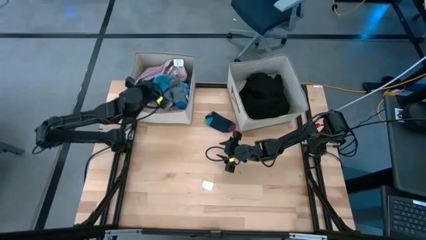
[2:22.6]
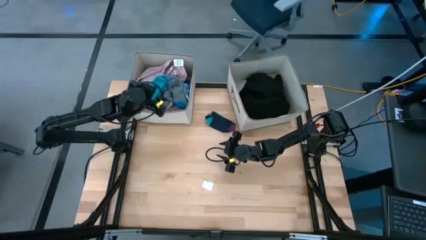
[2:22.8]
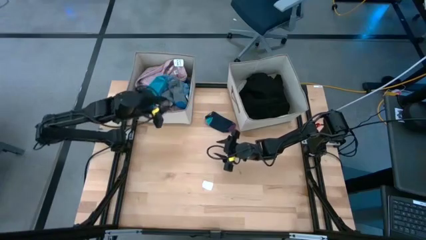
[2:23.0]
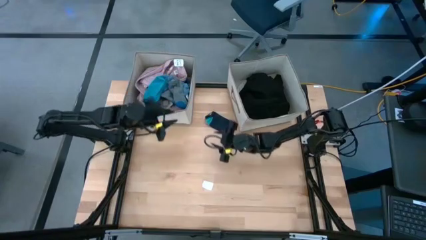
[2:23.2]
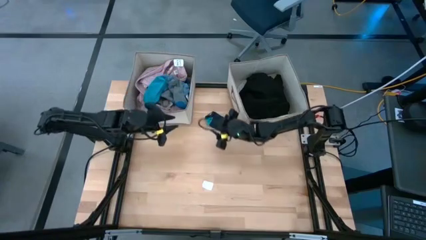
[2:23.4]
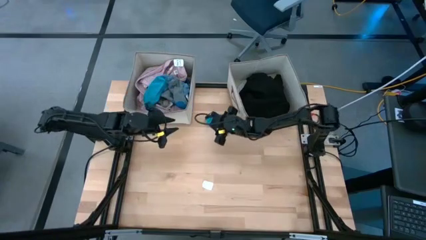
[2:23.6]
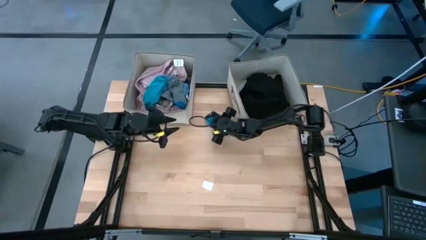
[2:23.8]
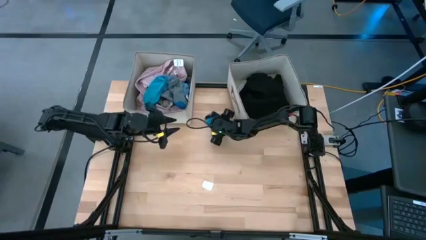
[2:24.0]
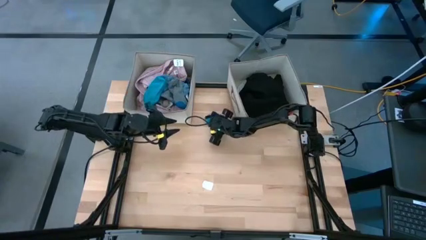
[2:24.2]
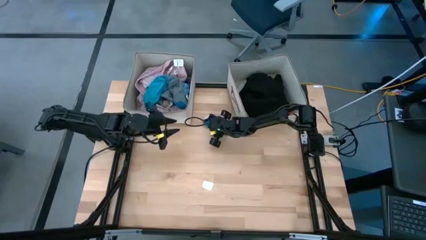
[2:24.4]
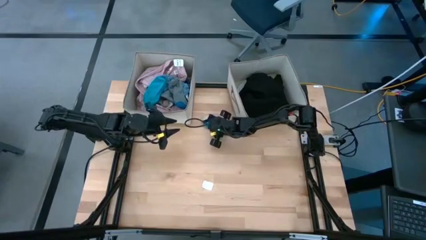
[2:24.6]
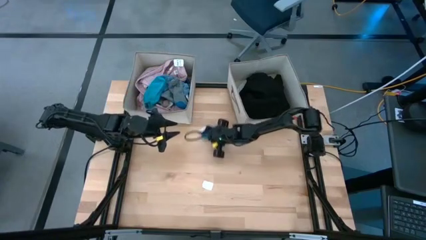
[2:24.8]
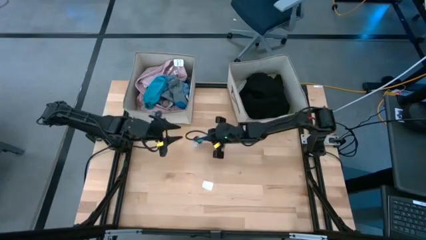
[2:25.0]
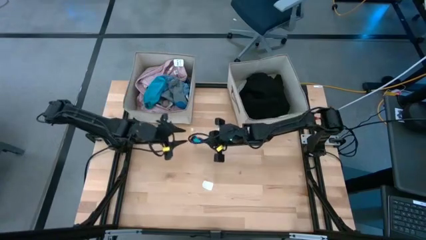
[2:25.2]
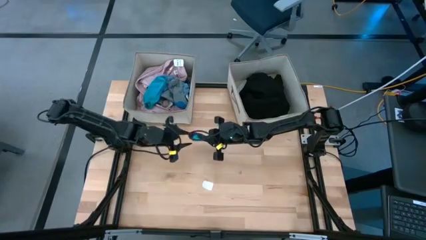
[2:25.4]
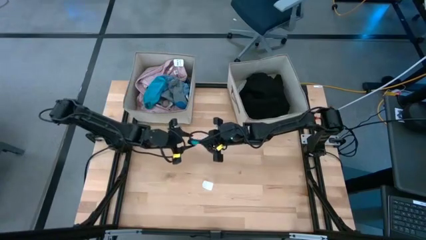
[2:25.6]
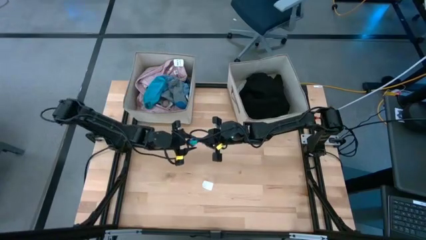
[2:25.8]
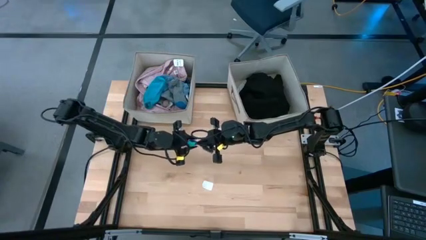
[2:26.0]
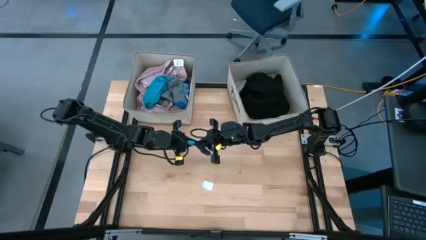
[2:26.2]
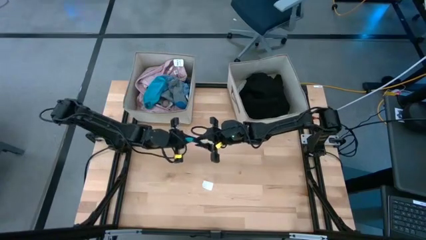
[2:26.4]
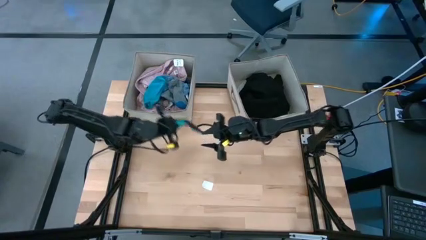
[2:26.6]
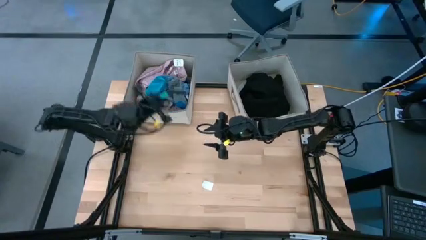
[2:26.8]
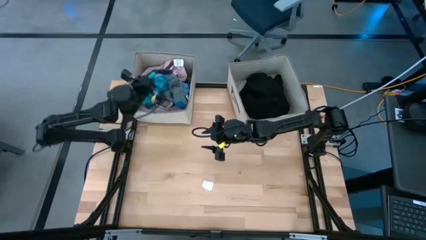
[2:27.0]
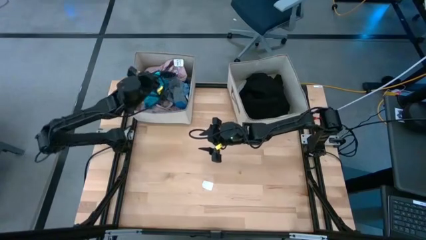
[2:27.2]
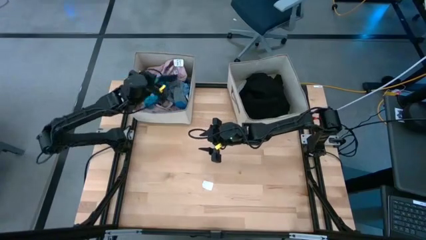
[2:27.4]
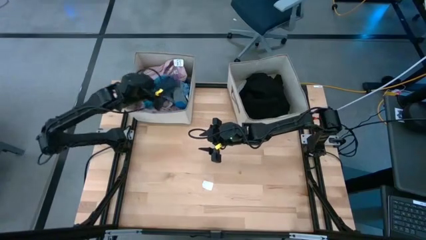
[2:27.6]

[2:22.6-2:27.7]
Task: Sort clothes
Put the dark blue sock into the left brown laundry organizer

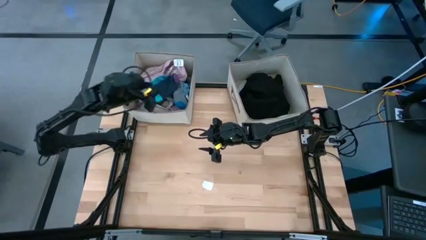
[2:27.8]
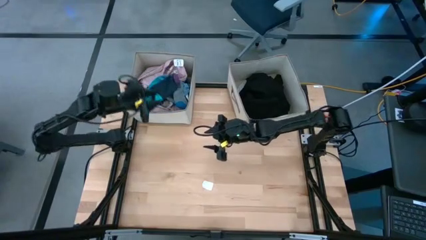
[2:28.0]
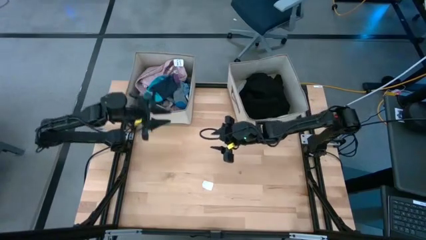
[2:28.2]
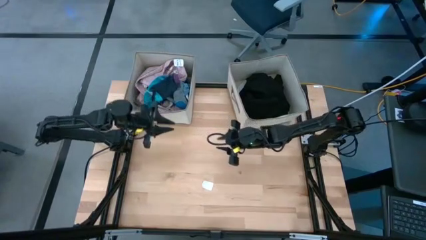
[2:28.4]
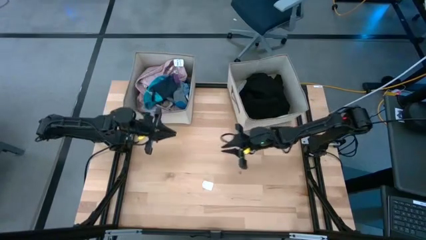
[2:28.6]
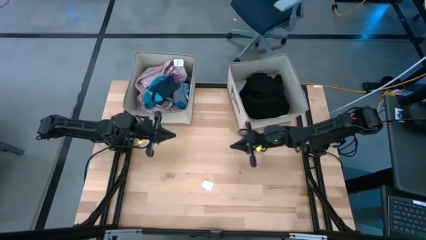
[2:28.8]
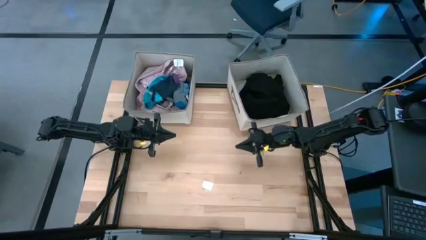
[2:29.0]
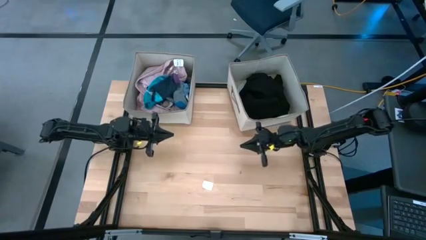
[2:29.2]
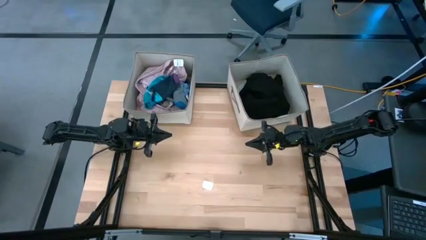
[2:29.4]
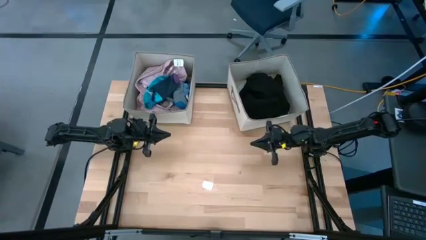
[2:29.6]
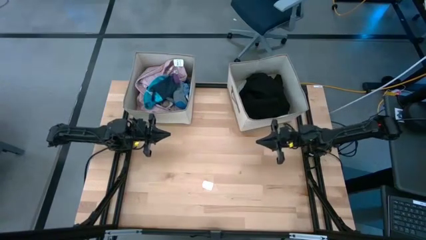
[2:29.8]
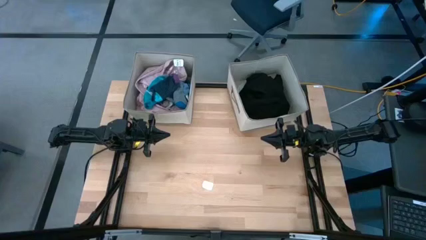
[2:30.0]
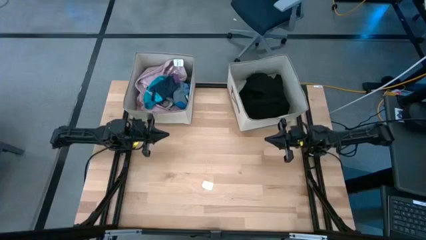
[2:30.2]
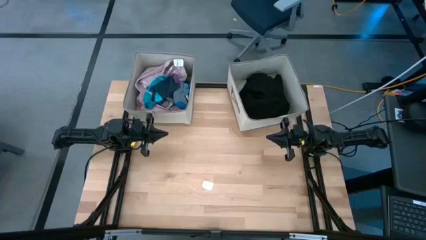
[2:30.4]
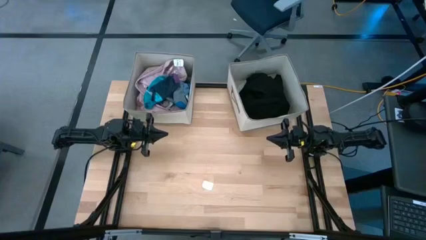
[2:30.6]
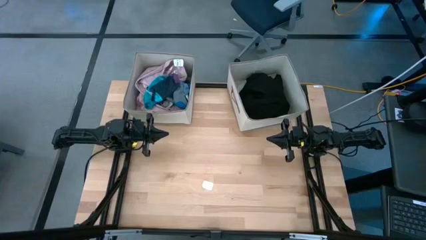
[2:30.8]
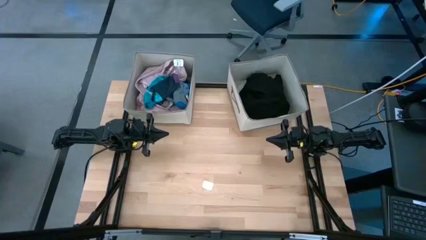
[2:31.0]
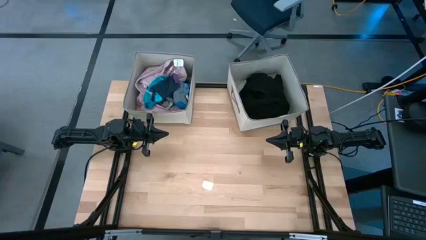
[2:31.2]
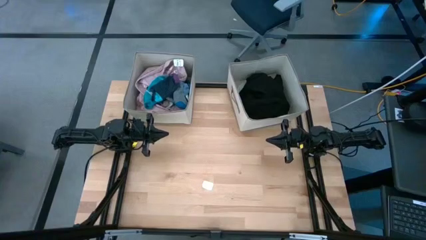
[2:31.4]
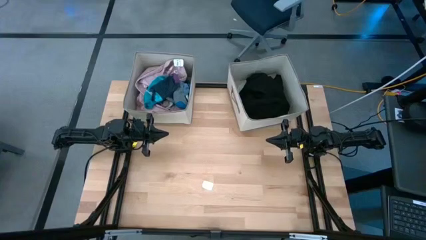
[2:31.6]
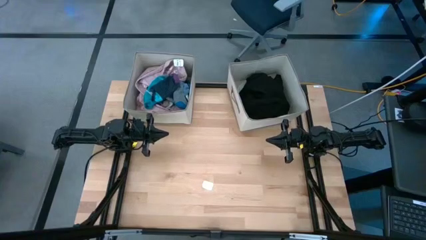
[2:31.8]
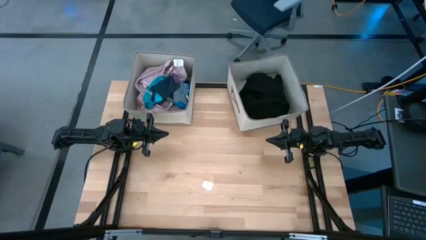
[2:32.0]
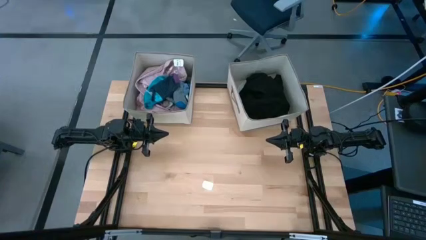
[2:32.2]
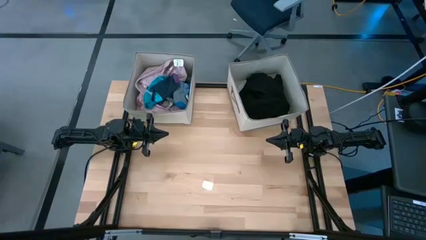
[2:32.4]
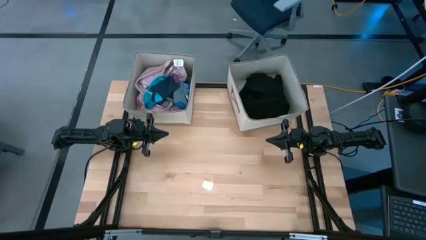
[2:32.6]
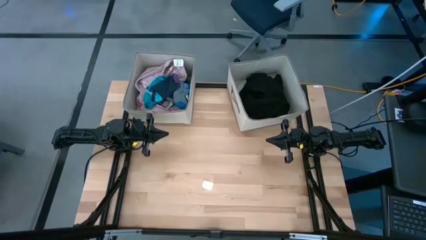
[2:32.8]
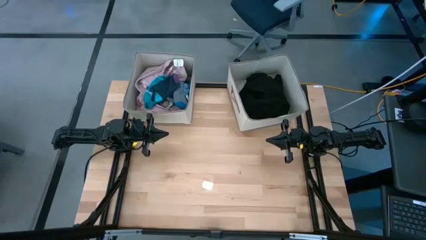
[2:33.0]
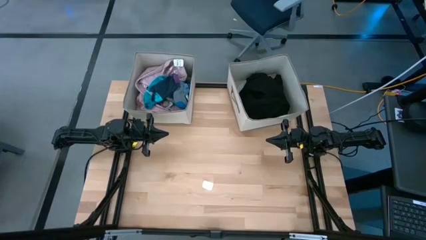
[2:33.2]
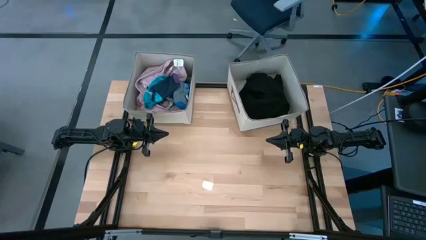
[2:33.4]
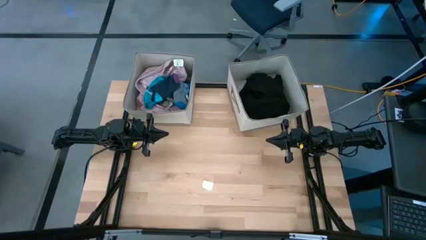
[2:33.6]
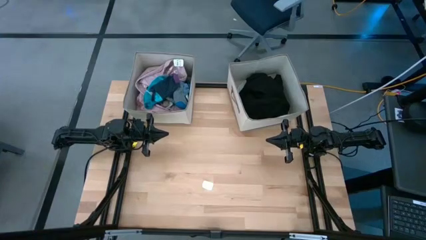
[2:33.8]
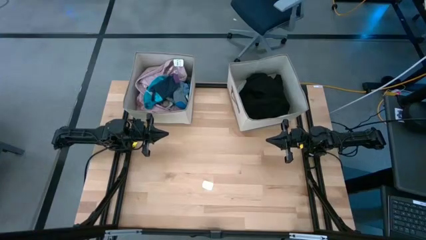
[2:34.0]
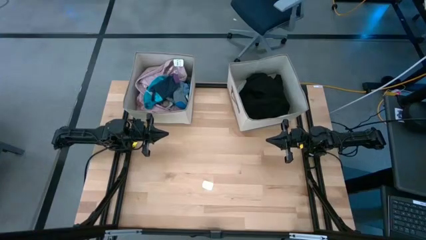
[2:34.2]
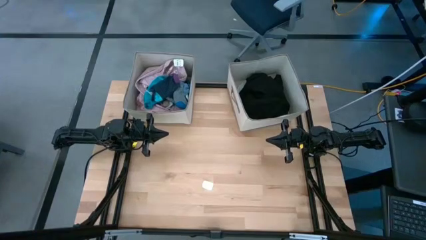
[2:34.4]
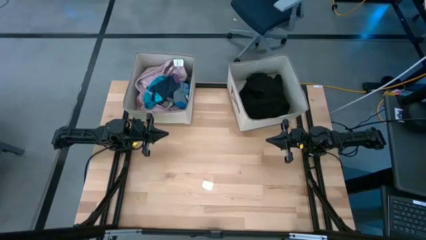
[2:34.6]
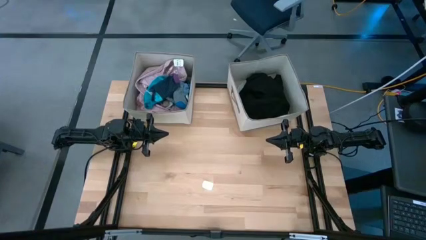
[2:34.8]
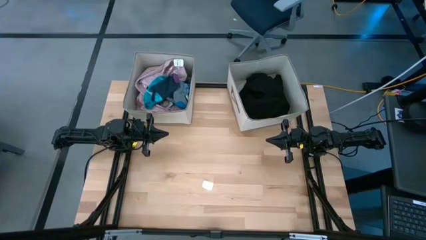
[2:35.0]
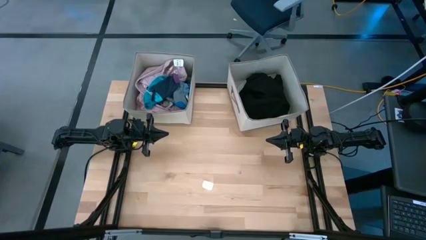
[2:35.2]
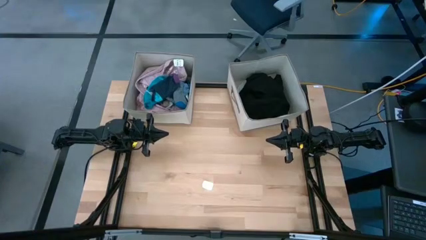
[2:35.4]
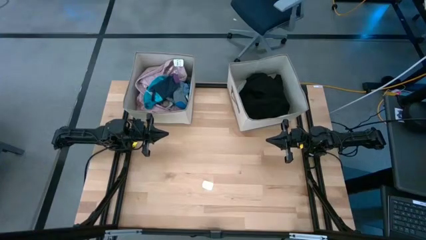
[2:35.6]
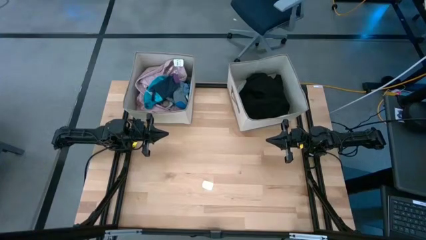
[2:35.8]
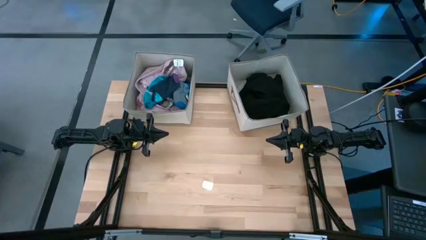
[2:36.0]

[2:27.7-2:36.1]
Return to Home Position
